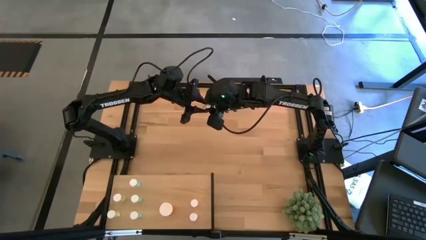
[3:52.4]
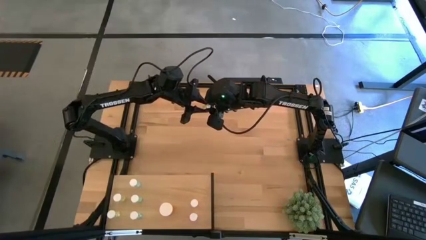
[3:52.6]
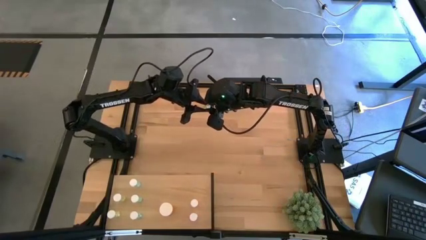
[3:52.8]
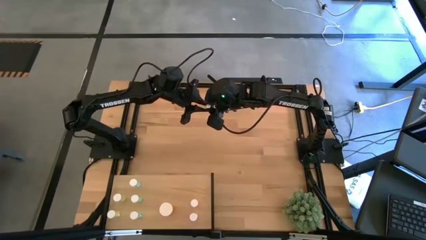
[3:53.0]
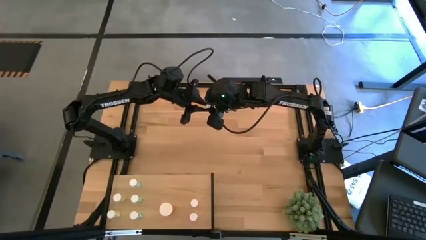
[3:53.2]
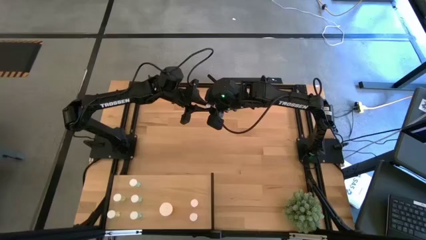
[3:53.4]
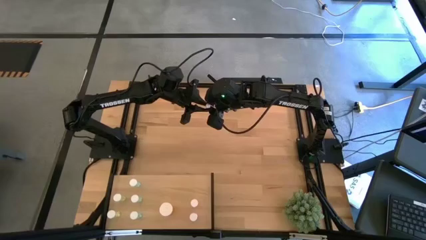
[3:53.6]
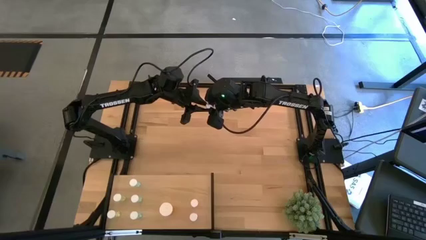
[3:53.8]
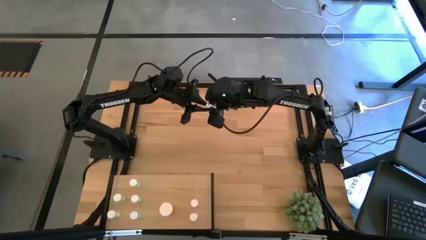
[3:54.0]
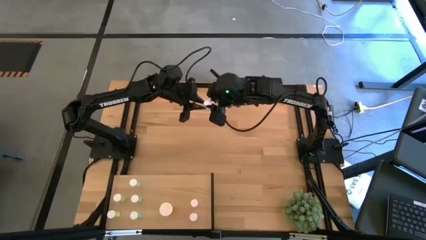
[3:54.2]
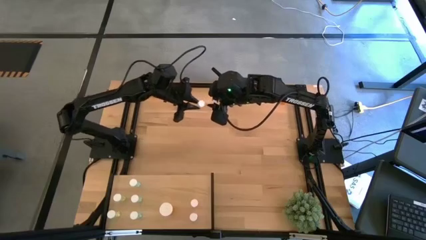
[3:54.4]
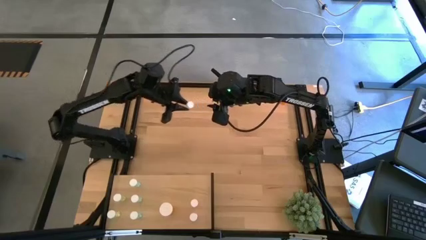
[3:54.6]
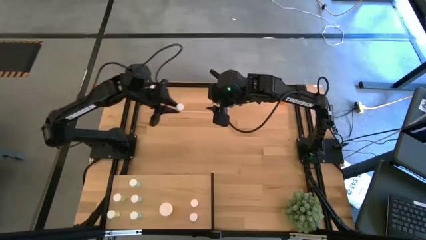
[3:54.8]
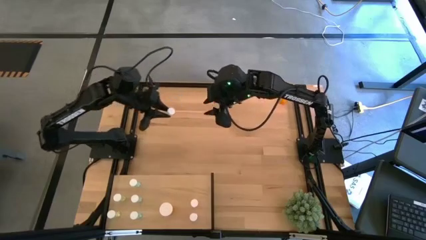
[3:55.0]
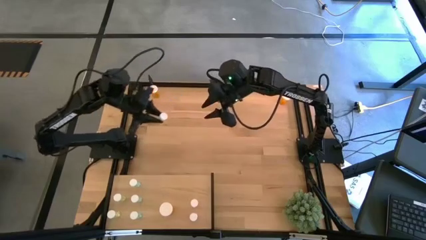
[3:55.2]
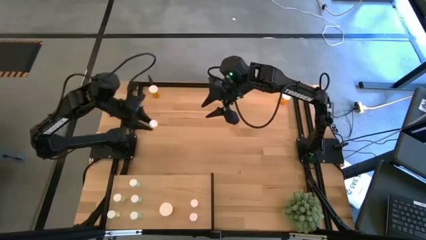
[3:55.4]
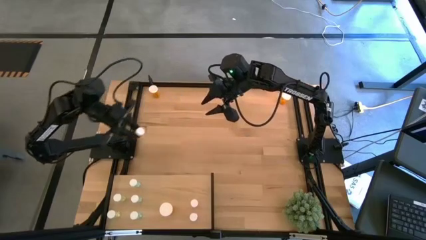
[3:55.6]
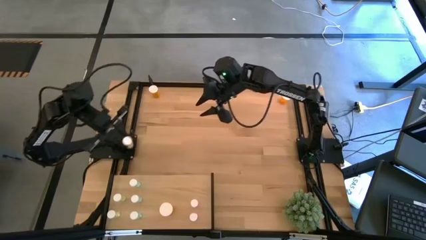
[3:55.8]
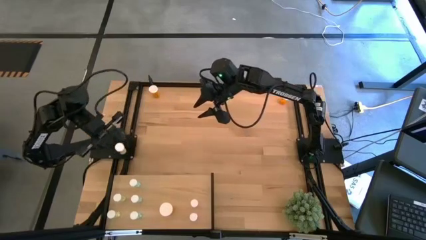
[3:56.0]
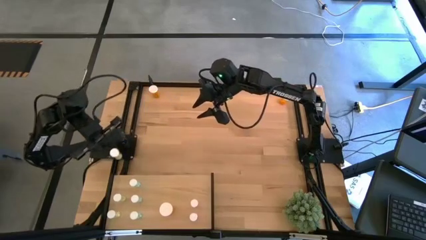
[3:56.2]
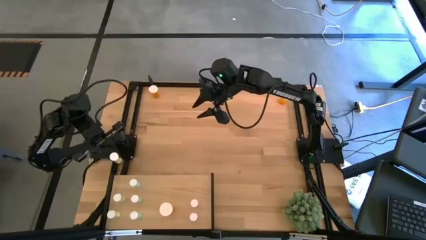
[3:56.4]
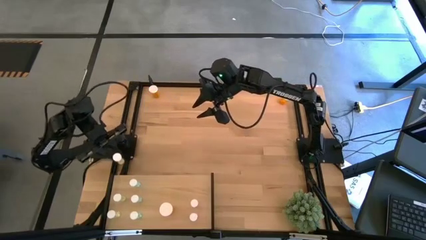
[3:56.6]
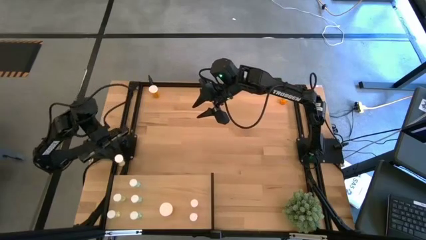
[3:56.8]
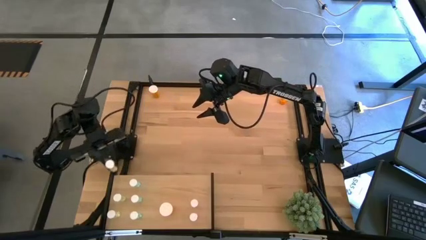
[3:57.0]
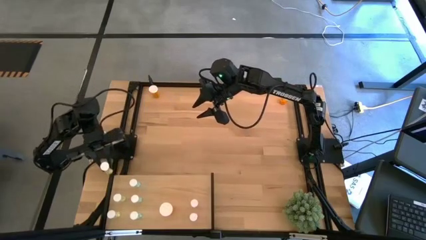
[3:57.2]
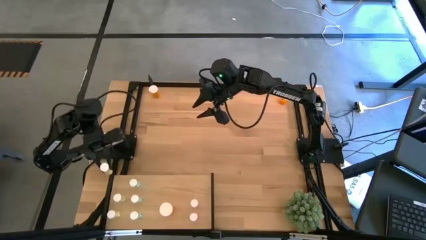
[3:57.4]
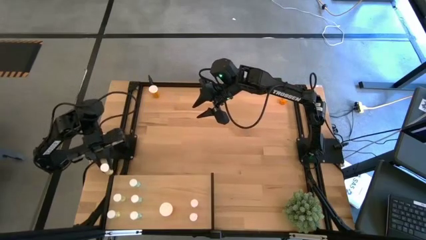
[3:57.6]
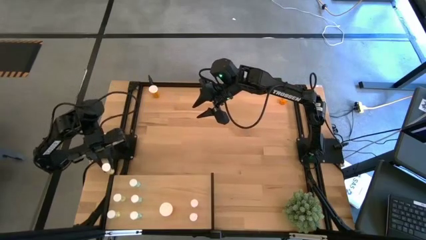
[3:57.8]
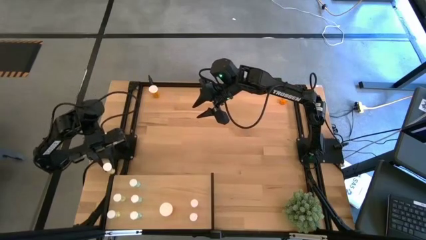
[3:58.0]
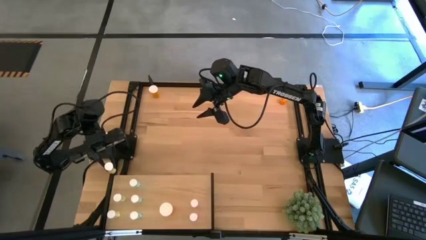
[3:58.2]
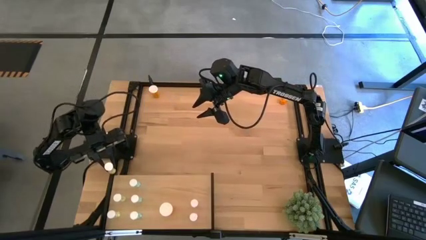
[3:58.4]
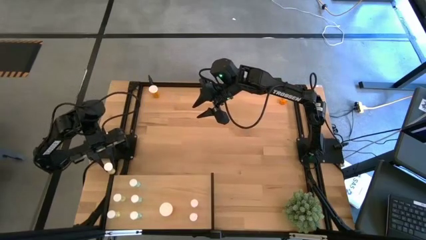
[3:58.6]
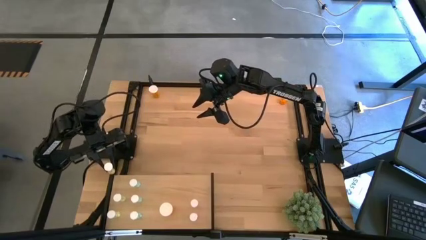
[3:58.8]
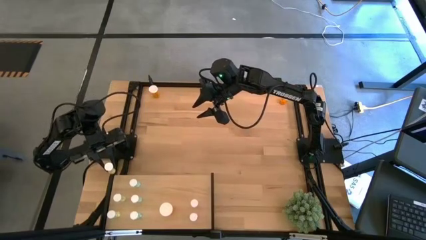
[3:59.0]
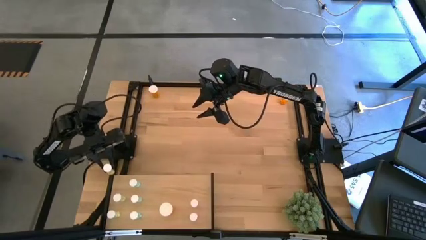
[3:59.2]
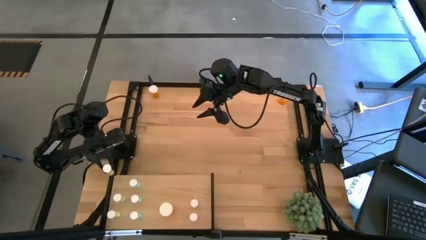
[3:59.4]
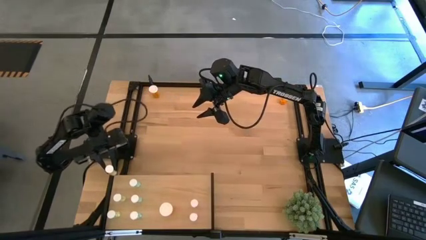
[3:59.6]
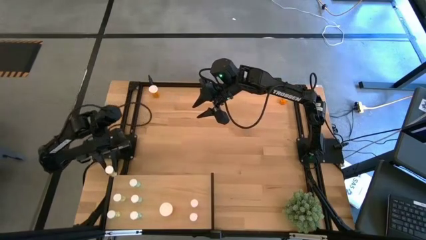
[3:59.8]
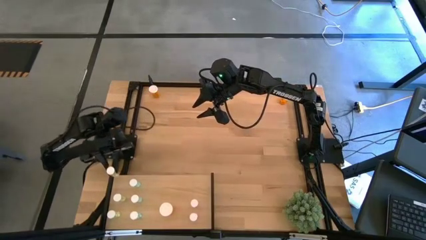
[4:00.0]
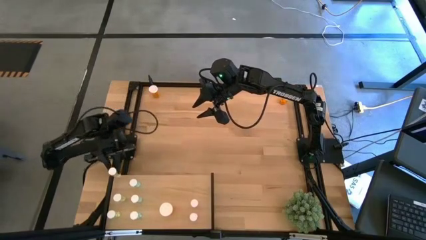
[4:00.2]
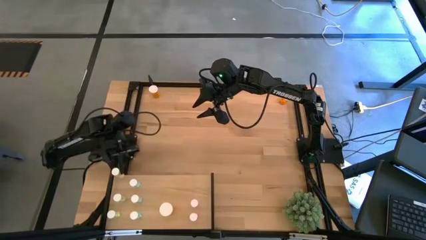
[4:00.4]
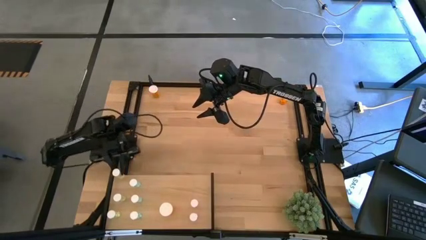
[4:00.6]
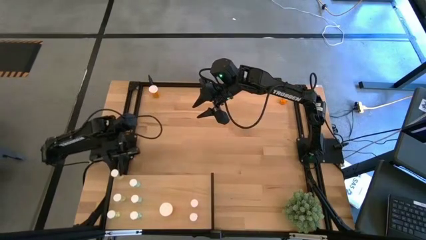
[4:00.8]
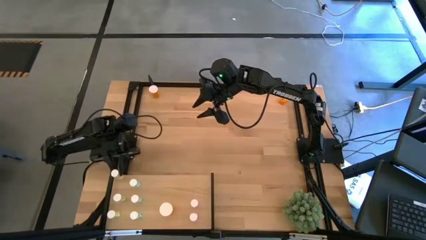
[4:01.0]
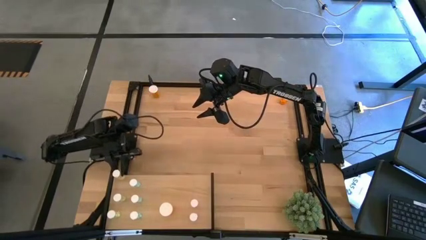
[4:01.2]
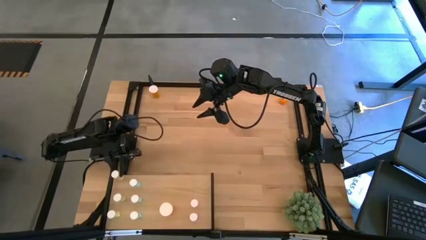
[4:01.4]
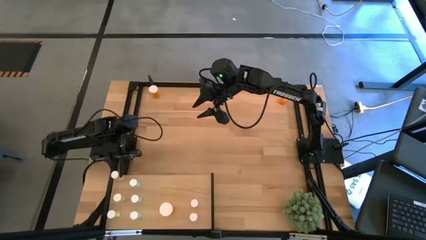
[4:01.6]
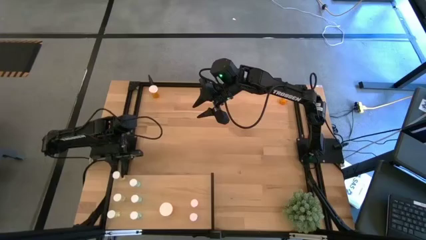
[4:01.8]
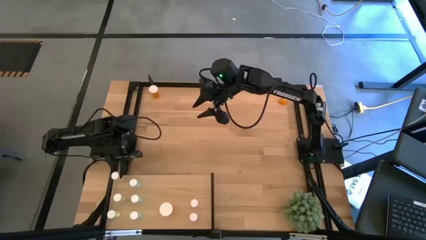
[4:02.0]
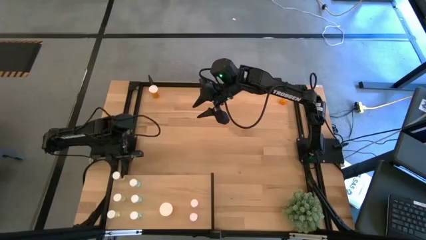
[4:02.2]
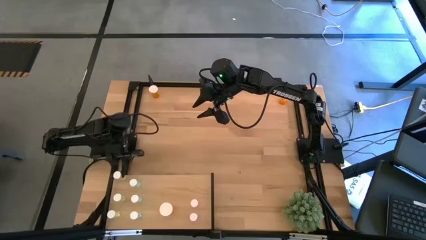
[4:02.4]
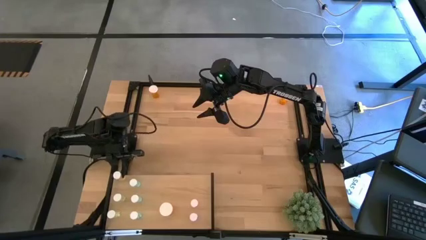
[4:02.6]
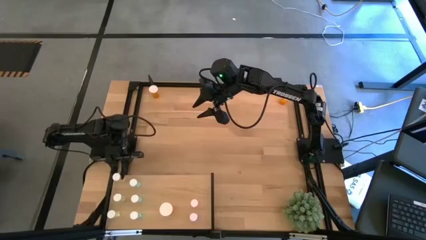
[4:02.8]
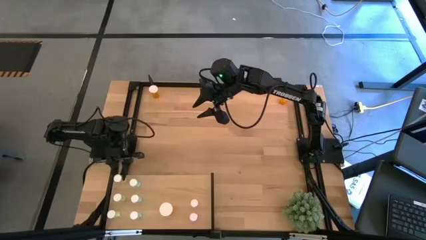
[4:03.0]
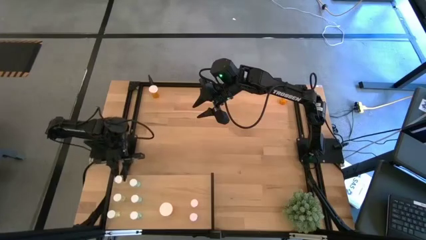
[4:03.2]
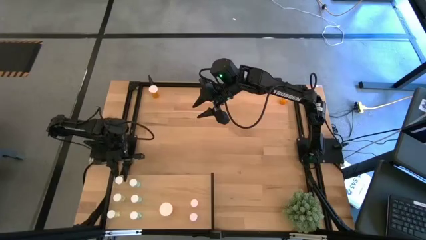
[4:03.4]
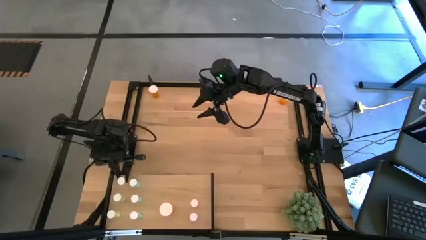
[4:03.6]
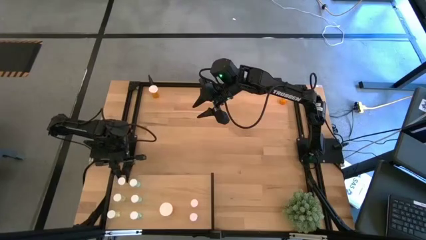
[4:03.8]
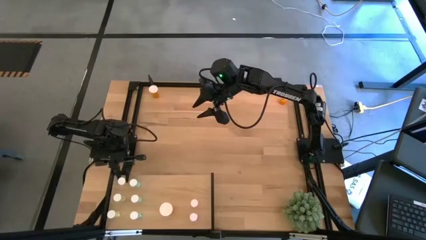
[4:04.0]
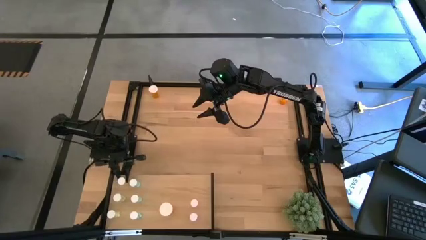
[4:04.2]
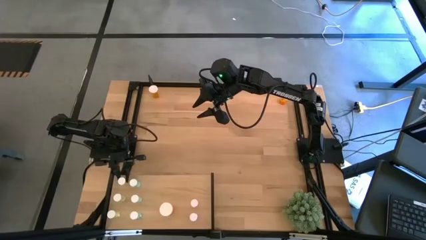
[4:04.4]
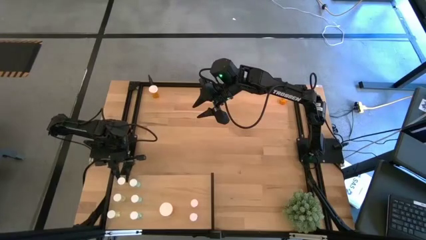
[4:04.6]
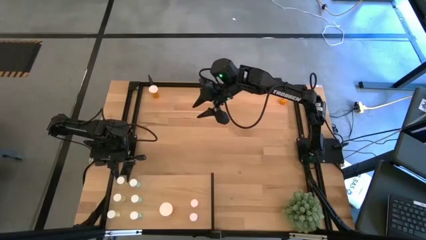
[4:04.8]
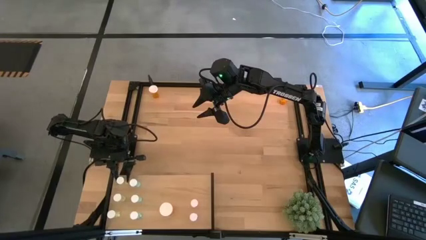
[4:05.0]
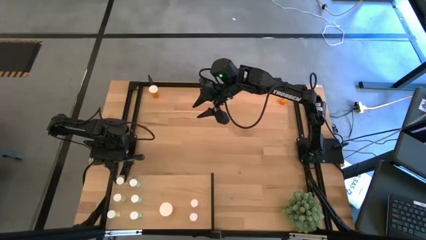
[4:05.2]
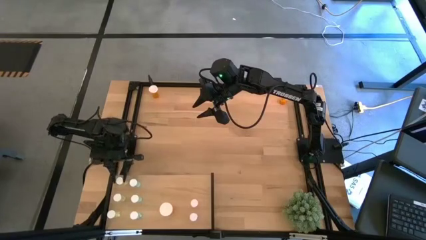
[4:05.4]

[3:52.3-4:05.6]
Task: Pick and place medicine bottles onto shelf by color
Put the yellow pill bottle on the shelf aligned with the other yellow pill bottle

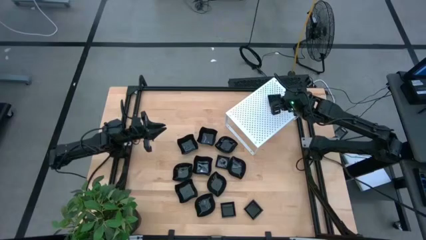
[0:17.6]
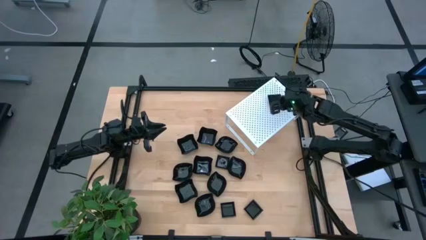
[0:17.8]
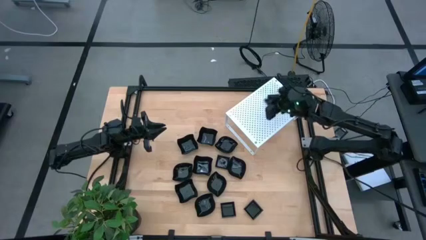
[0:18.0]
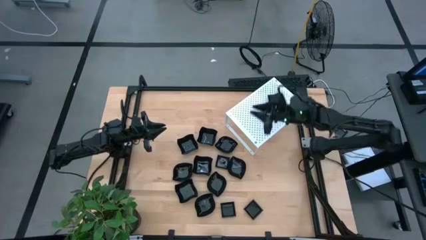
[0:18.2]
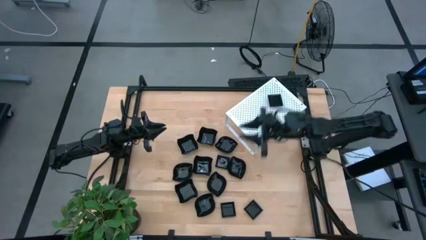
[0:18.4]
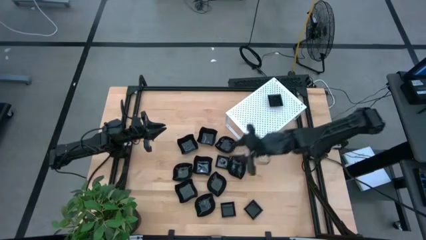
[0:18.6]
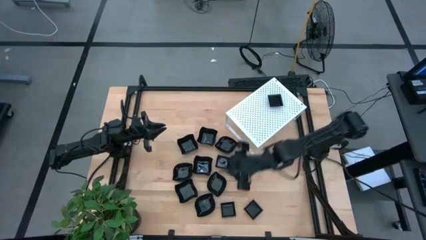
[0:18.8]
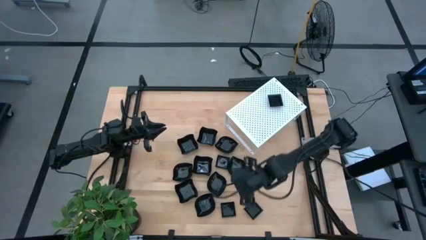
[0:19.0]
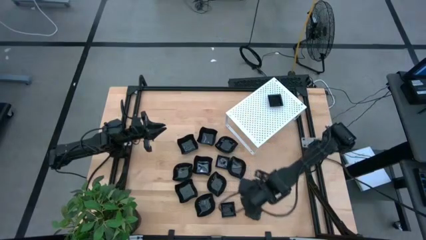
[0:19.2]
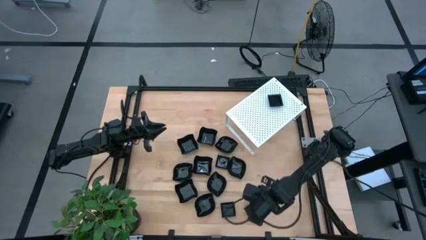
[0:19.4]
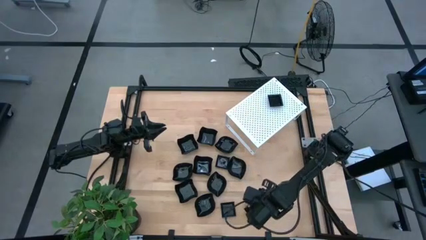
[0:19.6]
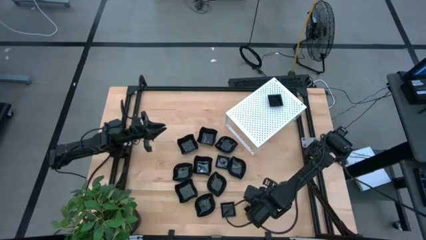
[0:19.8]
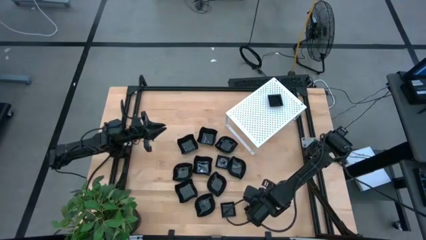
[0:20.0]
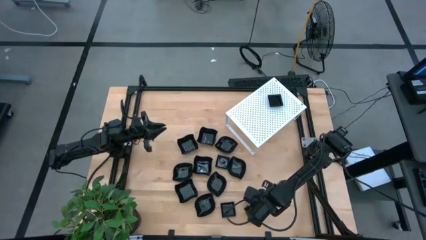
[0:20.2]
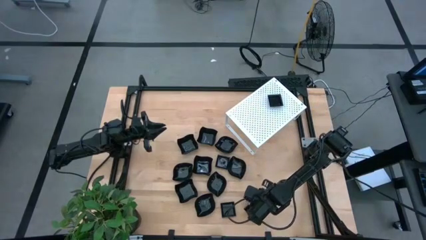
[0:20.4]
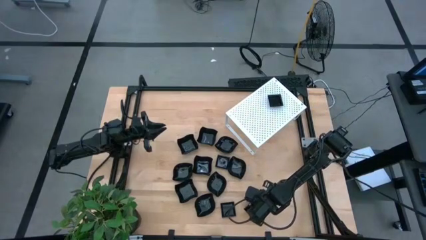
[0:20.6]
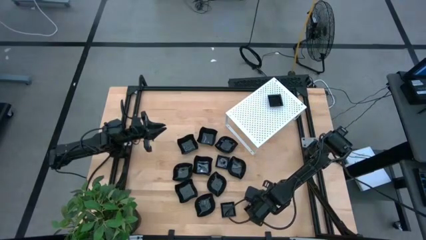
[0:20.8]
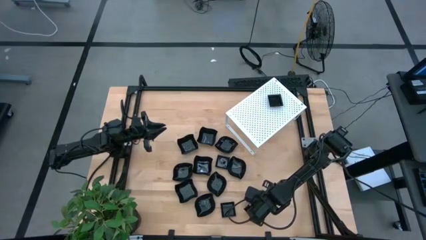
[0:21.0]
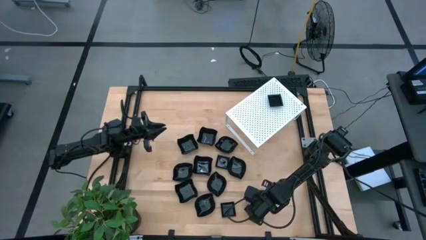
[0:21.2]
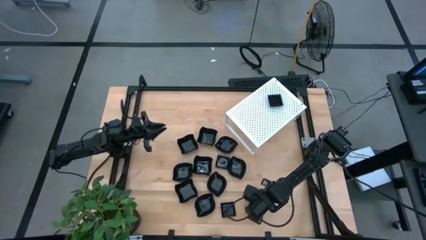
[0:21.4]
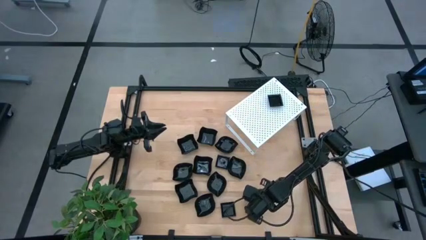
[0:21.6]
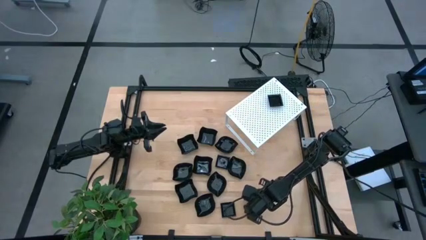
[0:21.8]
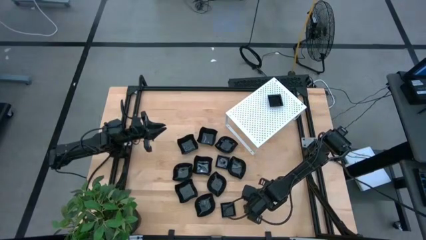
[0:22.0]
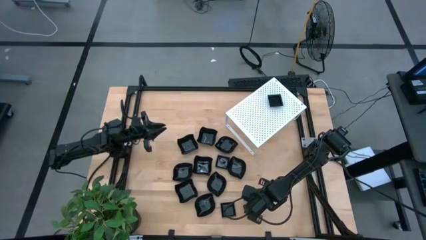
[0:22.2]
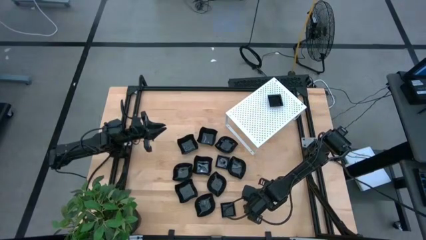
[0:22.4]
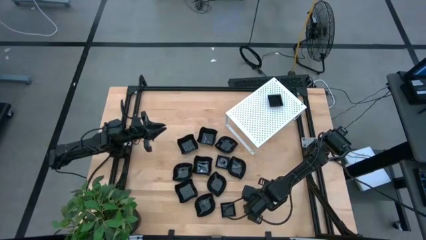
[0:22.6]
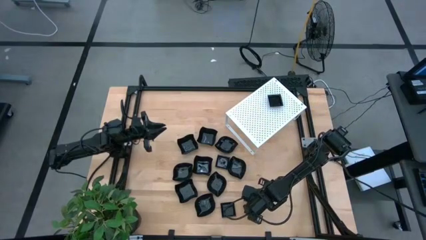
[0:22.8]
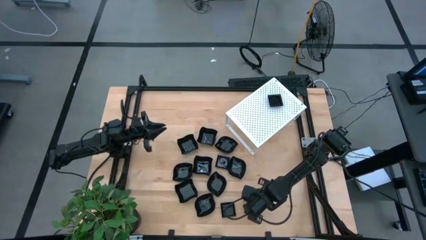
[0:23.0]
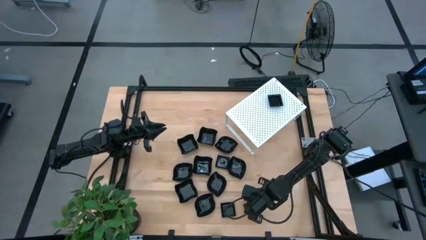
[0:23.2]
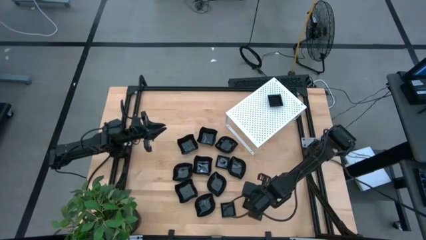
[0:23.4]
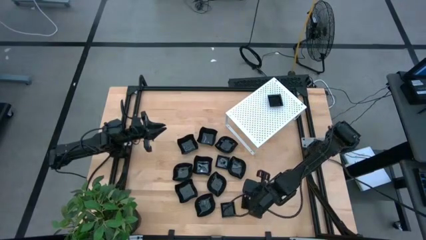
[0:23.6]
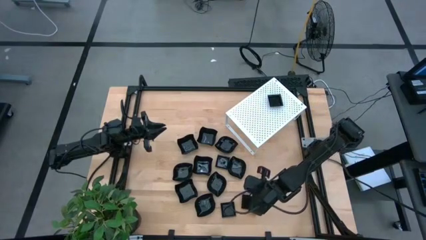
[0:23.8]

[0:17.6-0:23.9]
Task: Pick & Place Mini shaped plates
Stack the black square plate on top of the black square plate on the shelf
